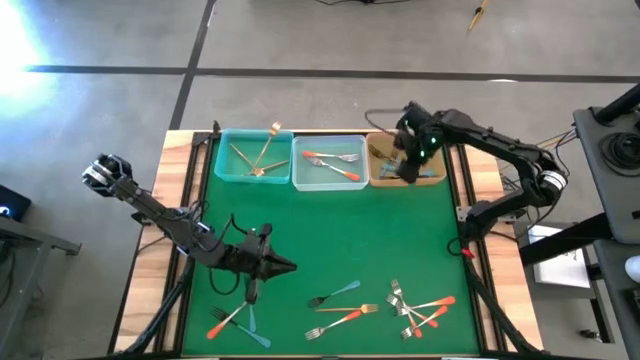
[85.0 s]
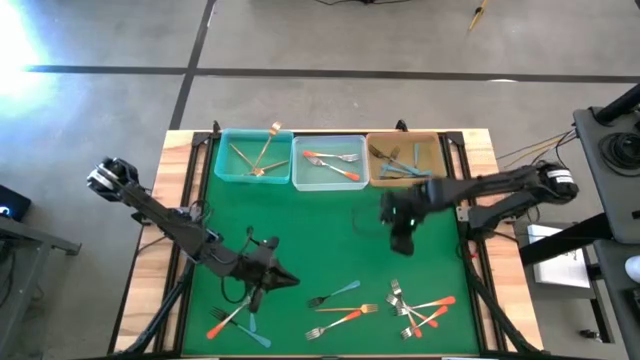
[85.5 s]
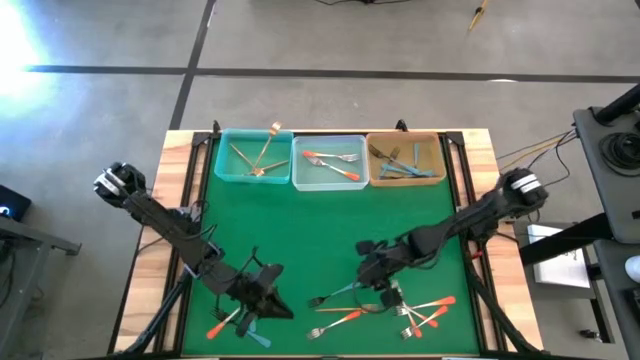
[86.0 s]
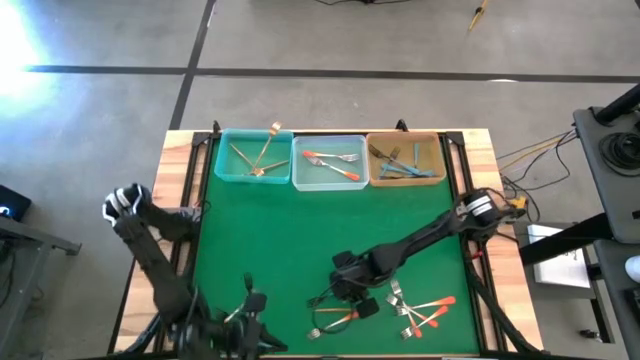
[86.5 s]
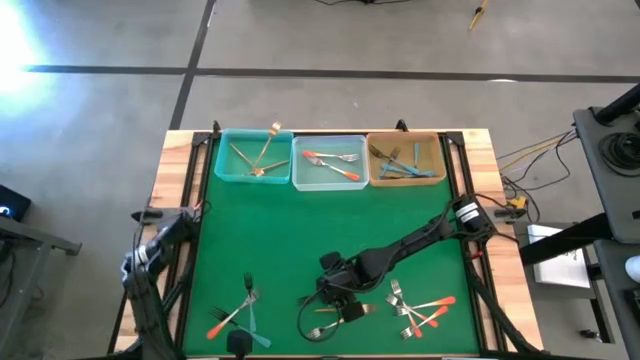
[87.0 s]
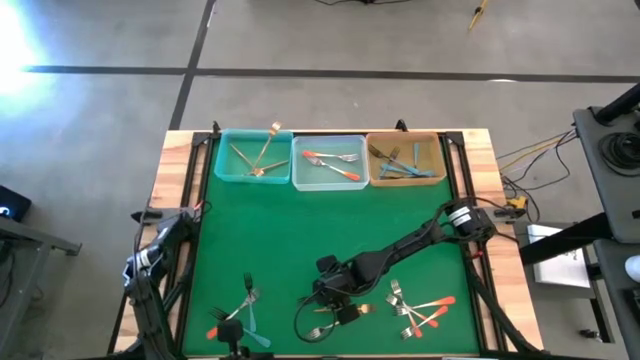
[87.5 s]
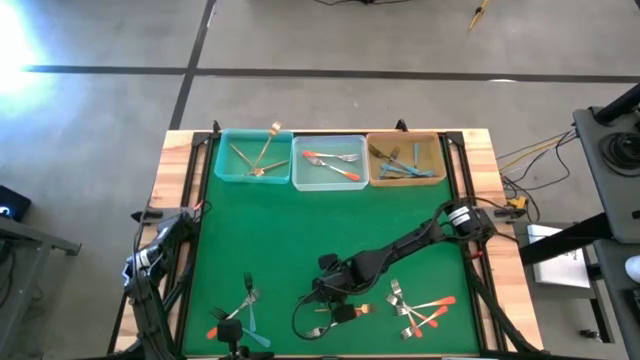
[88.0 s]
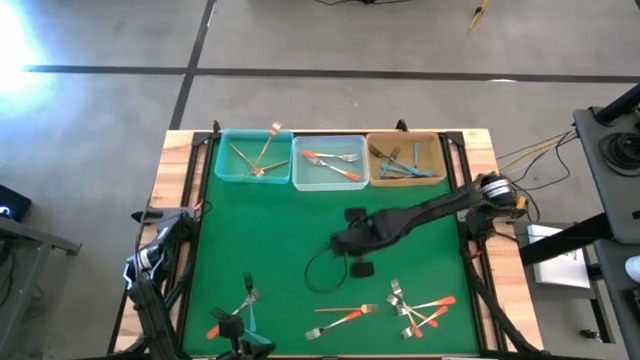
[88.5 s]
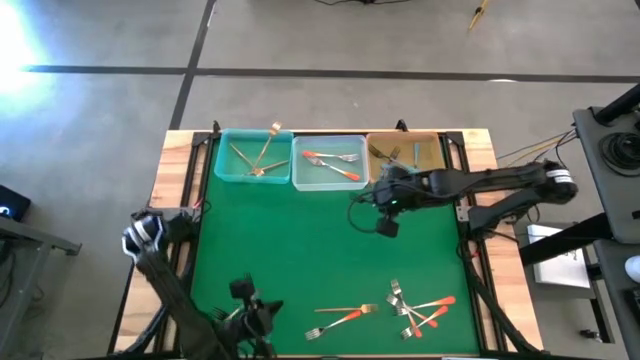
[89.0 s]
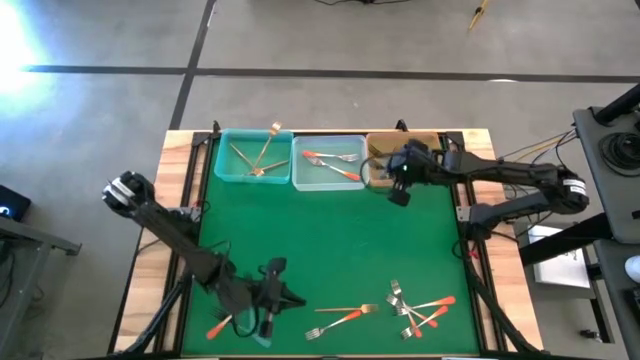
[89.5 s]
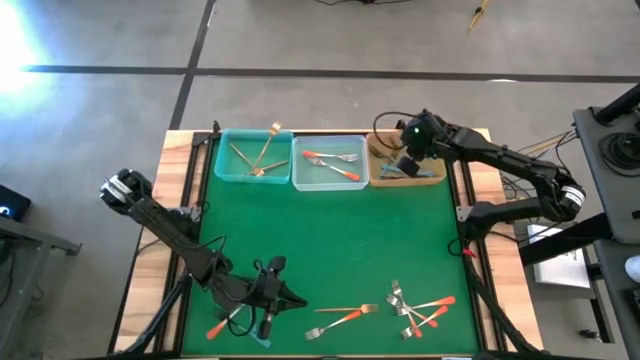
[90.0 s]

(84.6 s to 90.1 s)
Task: Sort silverware by color (type)
Put the blue fork into the orange bin

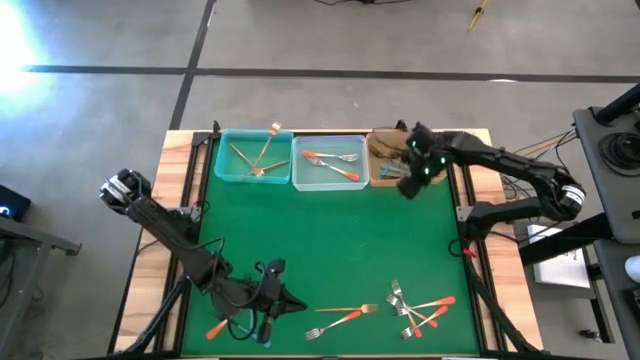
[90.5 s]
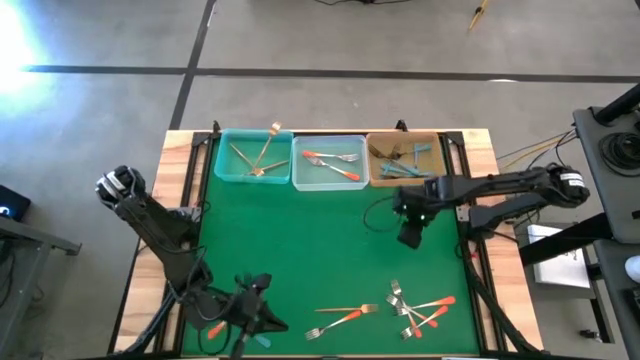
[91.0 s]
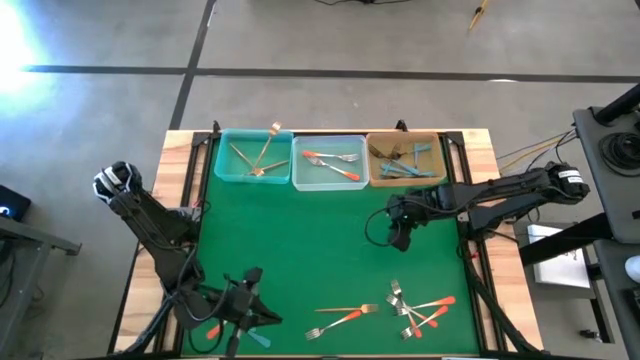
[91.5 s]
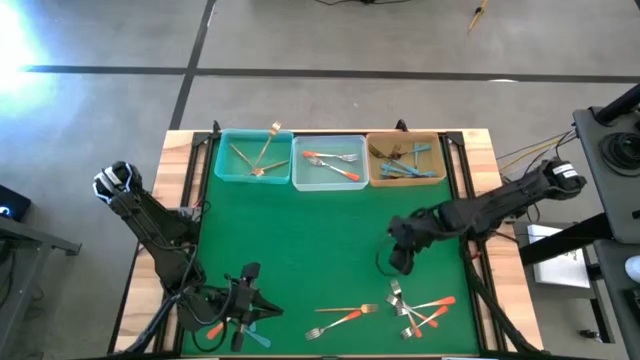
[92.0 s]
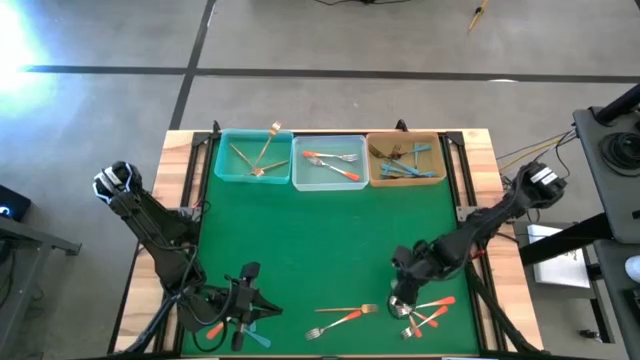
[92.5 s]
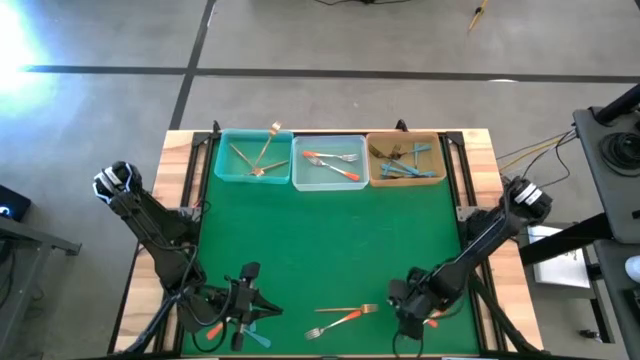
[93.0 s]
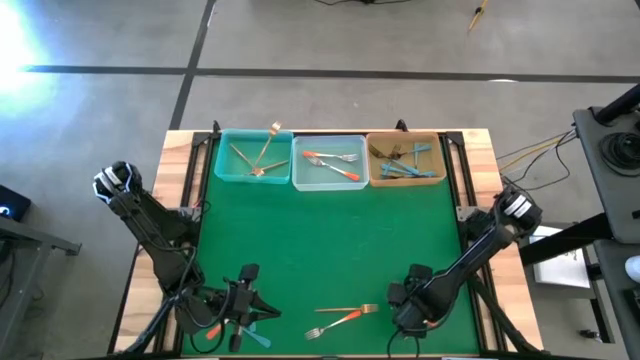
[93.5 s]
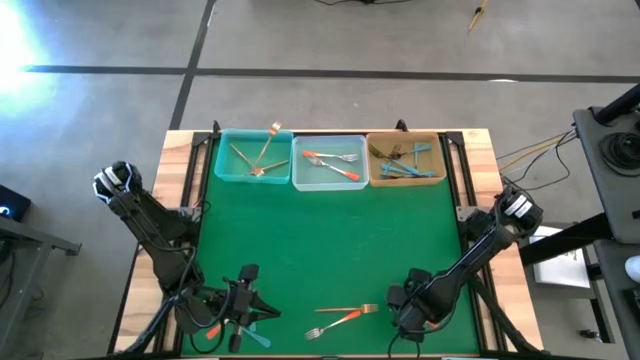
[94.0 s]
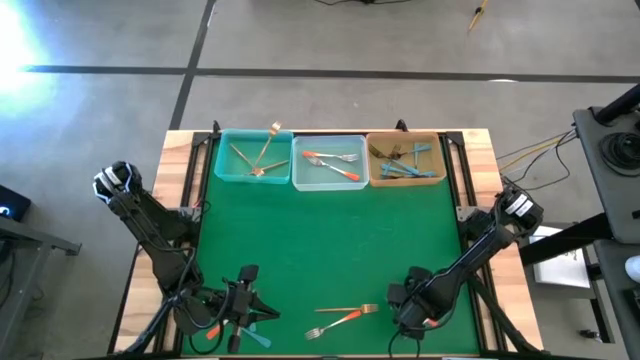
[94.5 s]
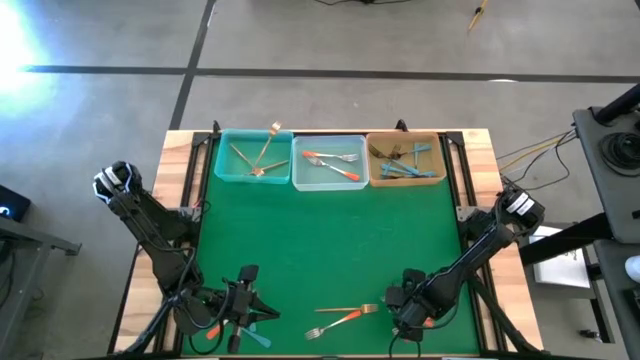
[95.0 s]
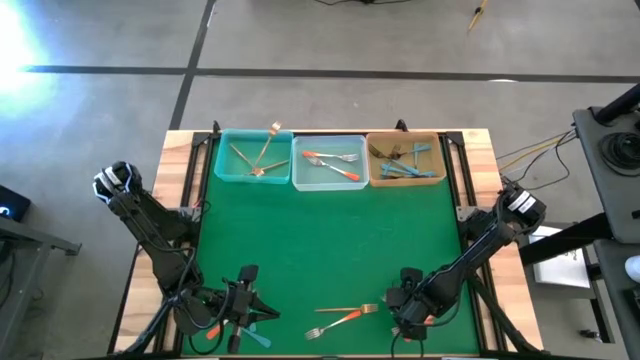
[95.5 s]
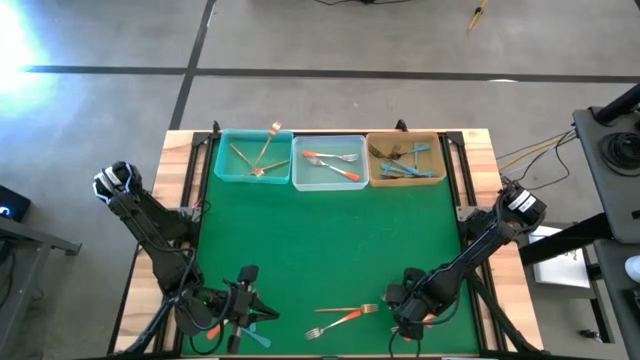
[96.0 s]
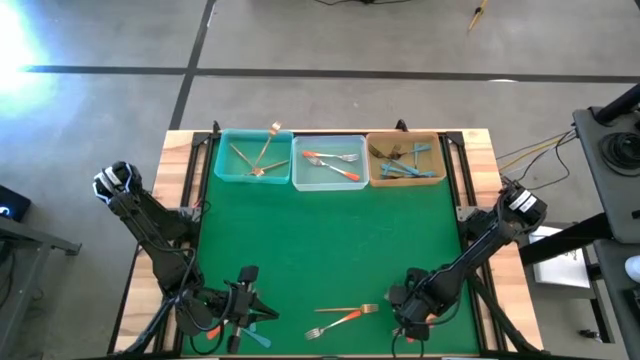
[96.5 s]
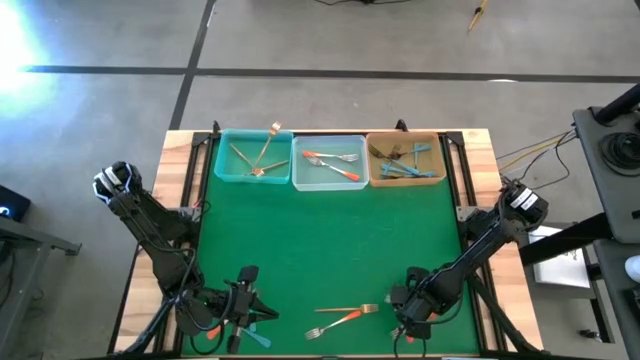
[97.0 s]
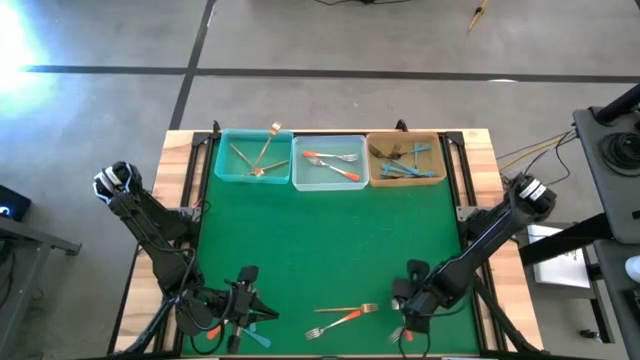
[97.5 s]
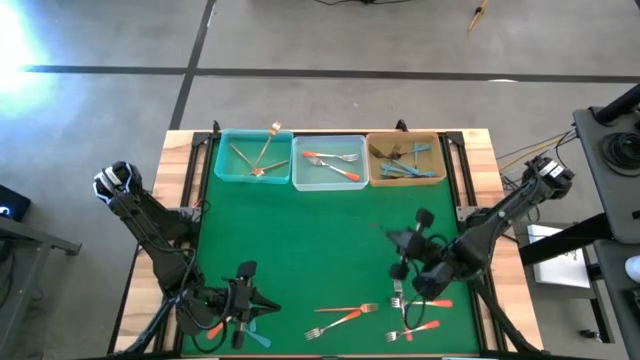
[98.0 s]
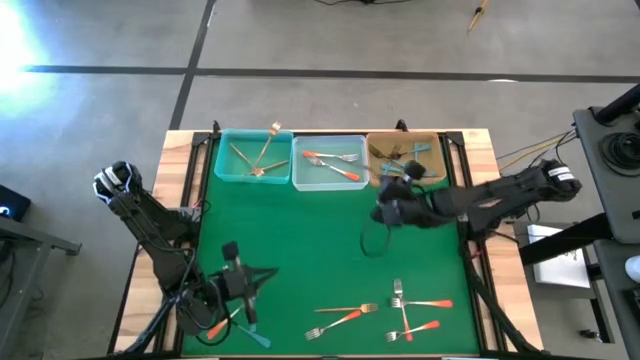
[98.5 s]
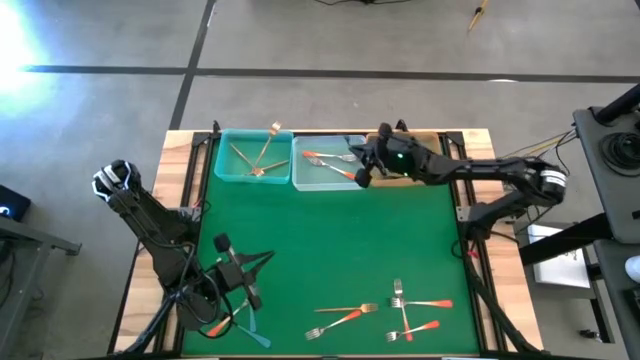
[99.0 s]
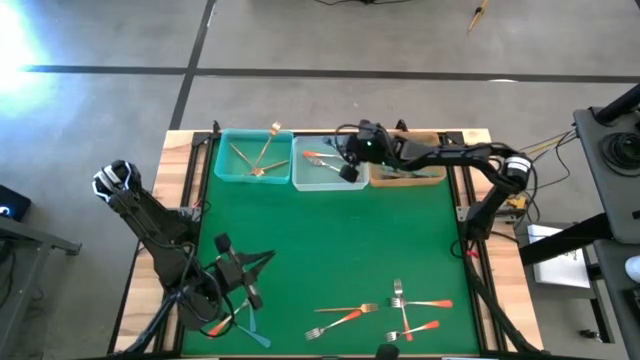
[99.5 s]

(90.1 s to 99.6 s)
Put the orange fork into the white bin

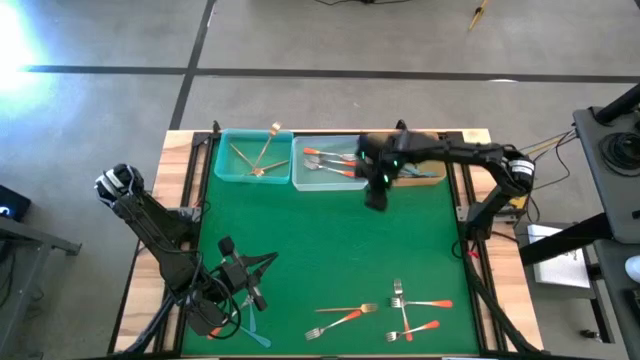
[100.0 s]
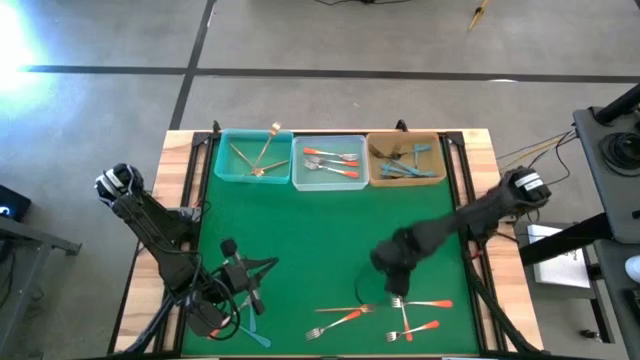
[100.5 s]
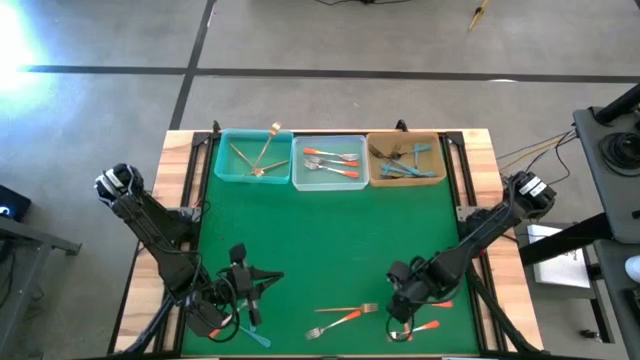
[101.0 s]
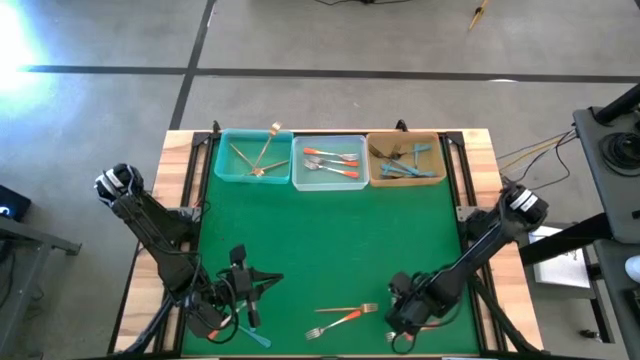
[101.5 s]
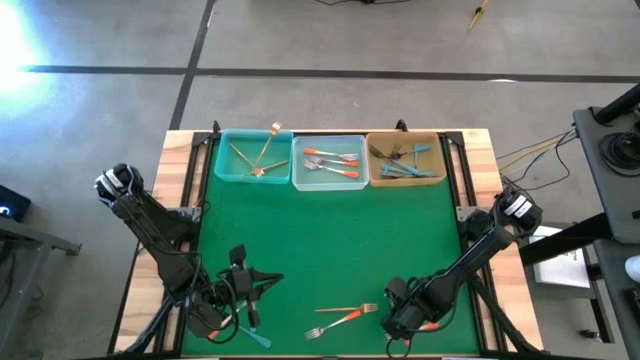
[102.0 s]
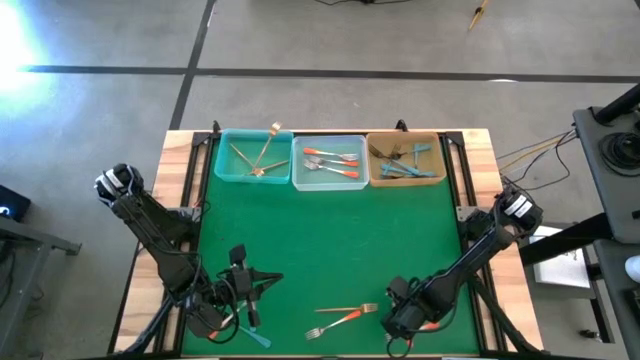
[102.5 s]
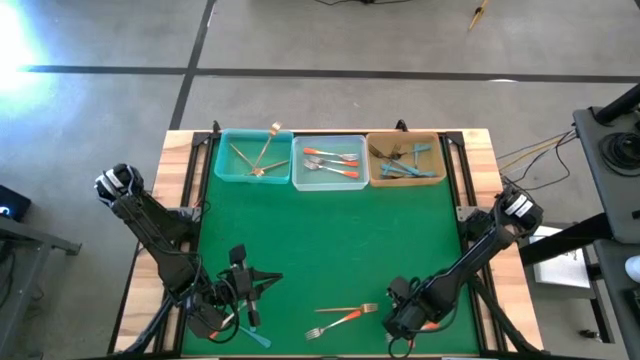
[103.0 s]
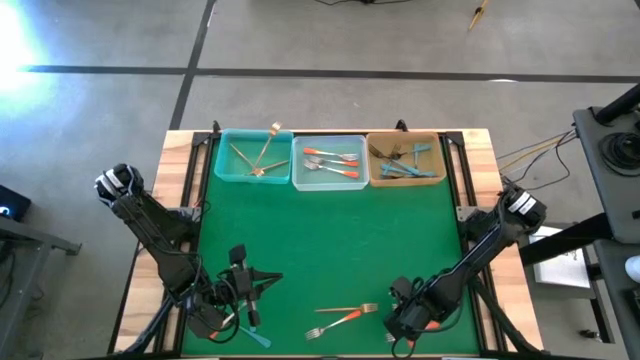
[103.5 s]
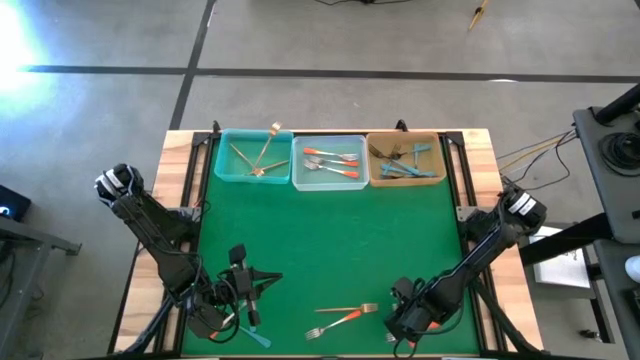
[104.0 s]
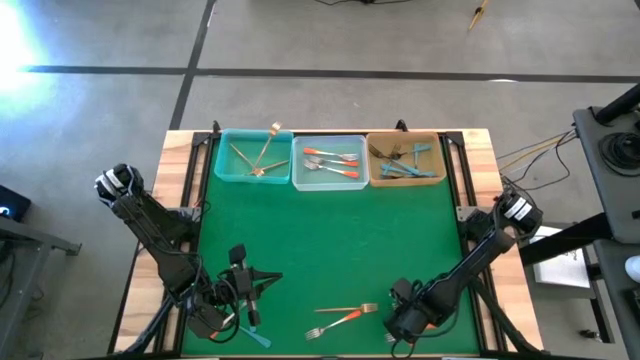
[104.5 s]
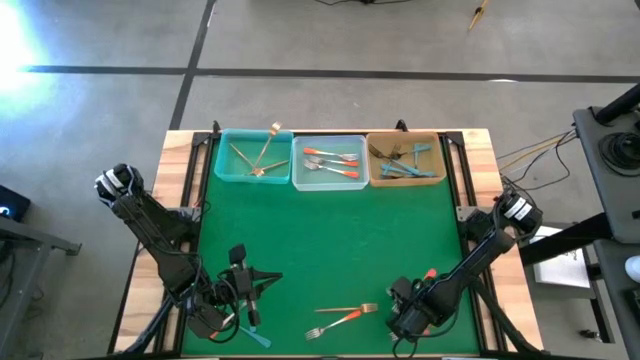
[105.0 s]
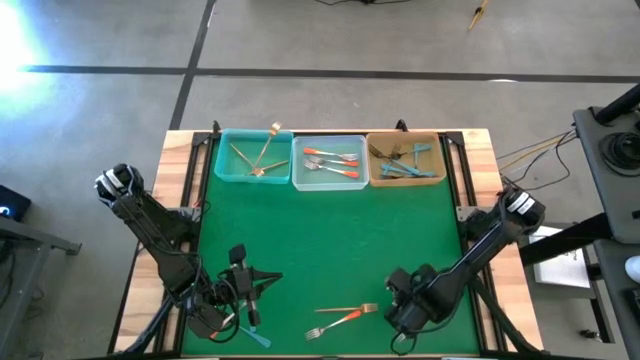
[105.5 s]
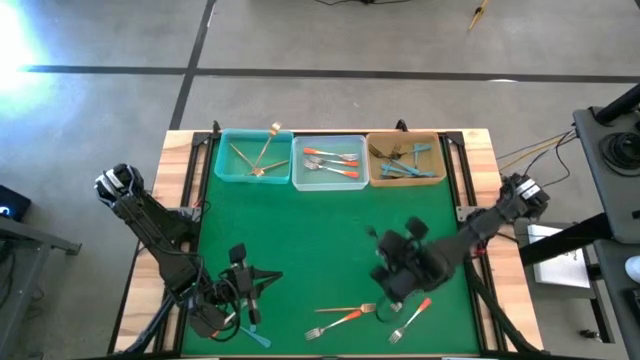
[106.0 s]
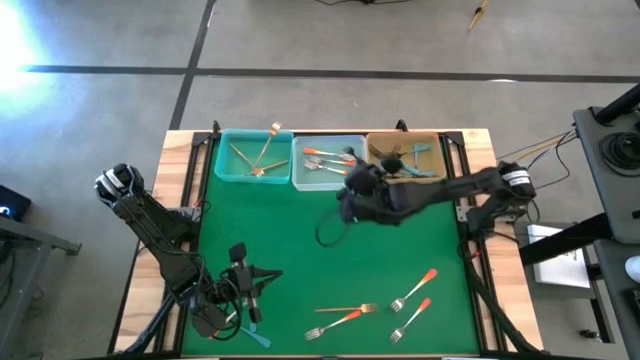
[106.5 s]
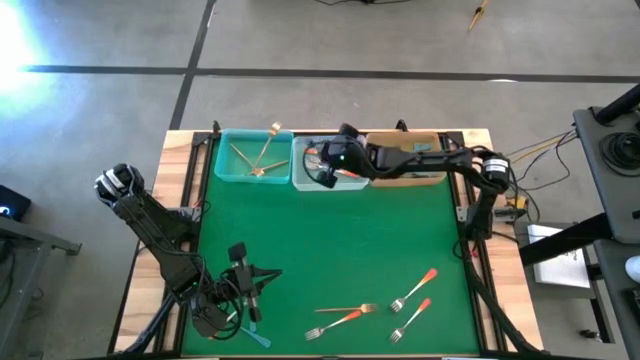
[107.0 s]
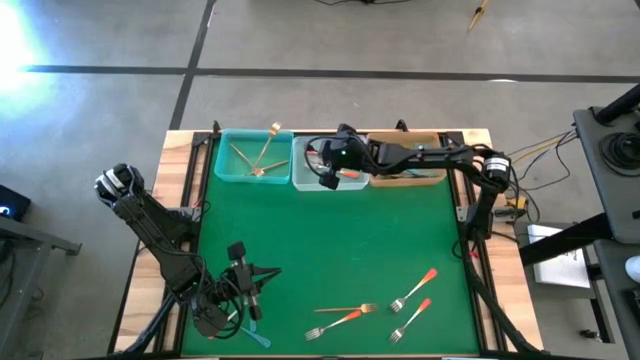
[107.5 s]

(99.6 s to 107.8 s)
Put the orange fork into the white bin
